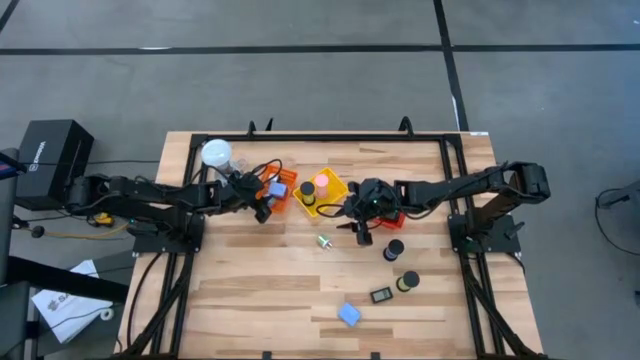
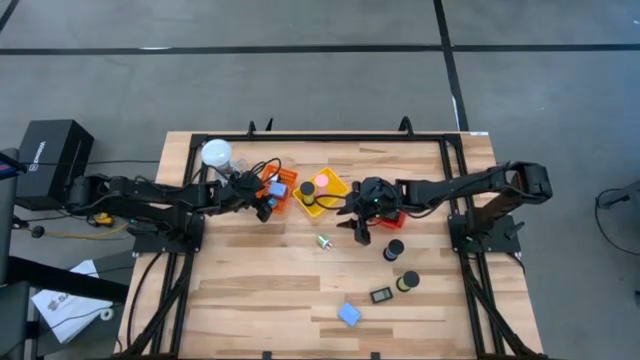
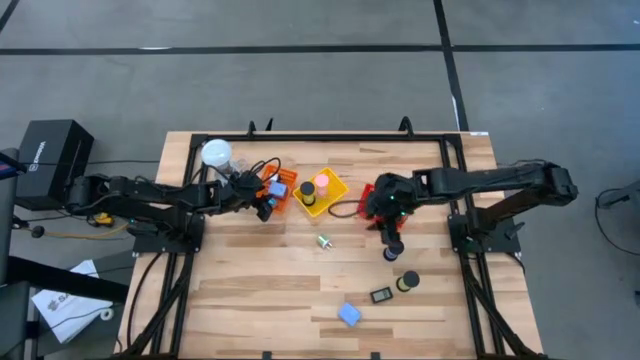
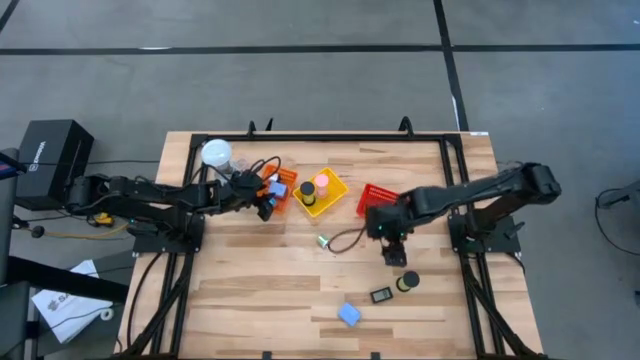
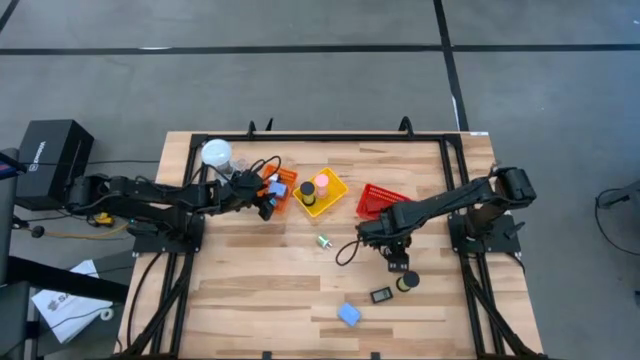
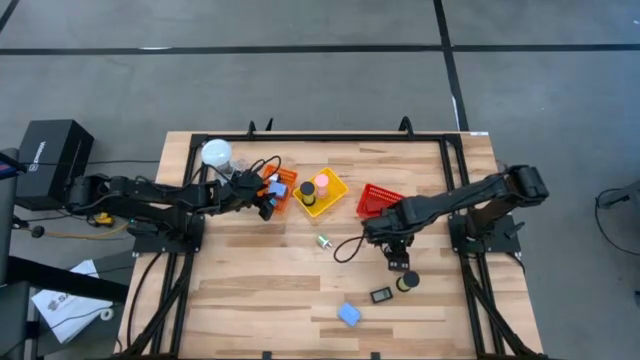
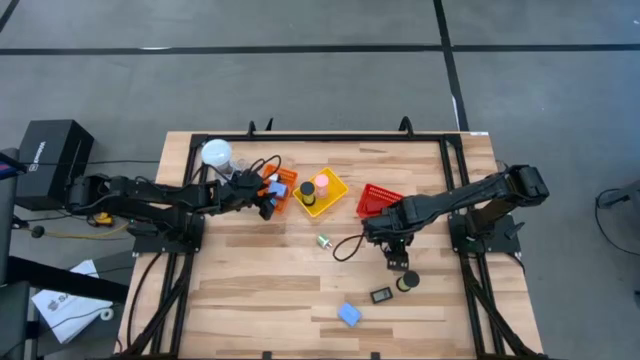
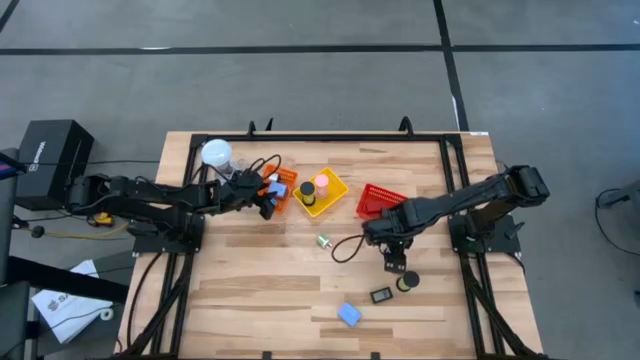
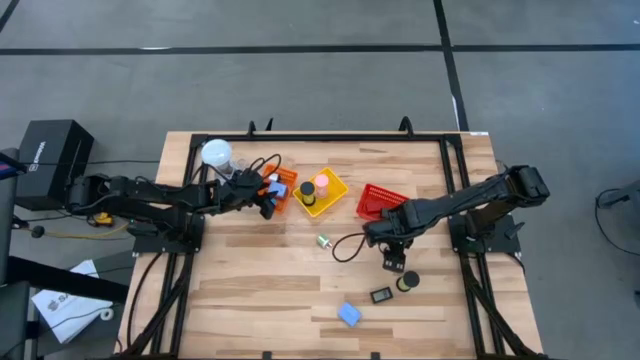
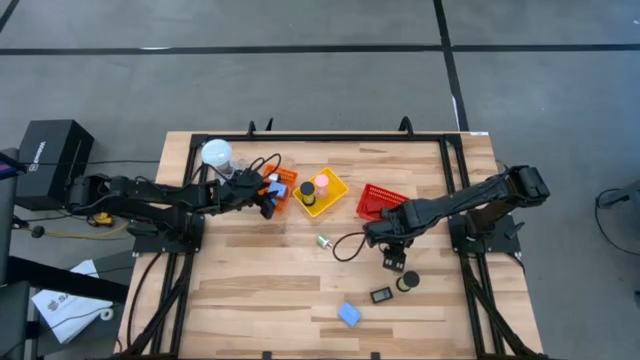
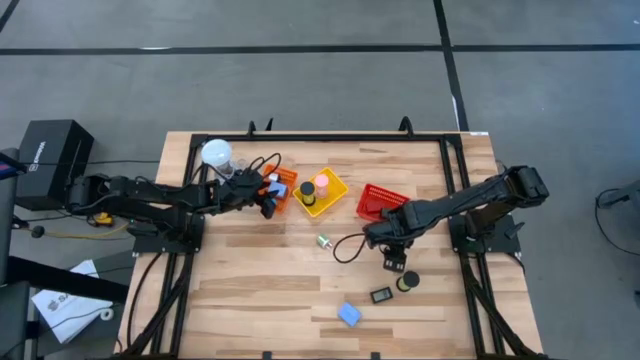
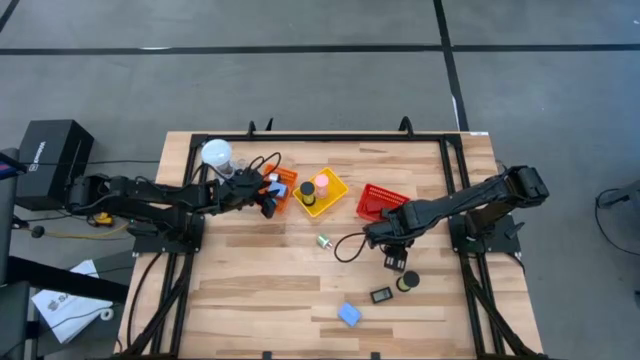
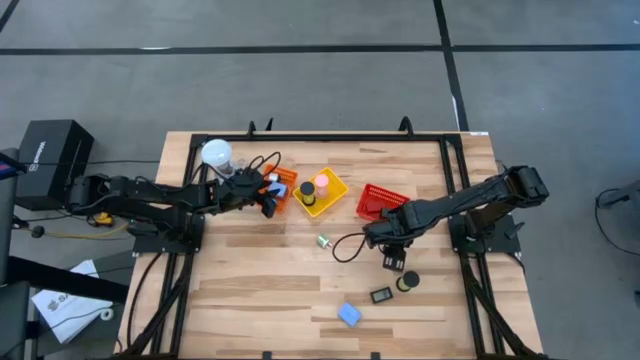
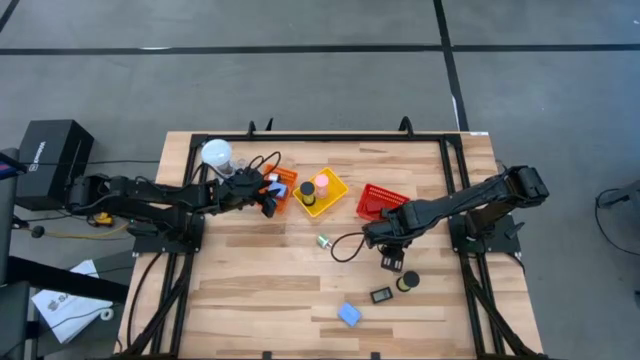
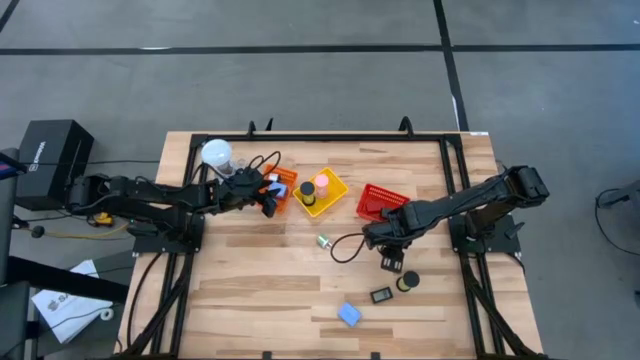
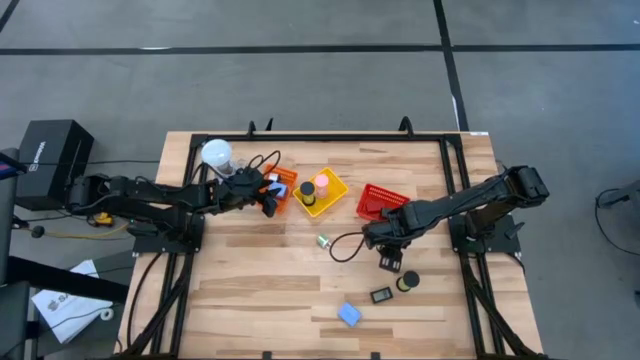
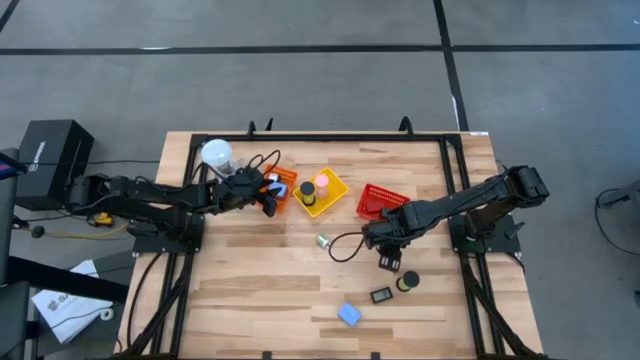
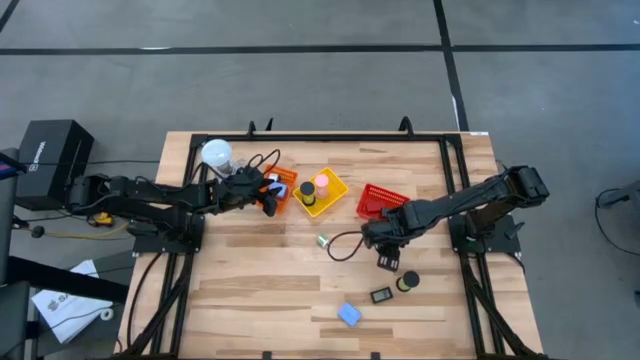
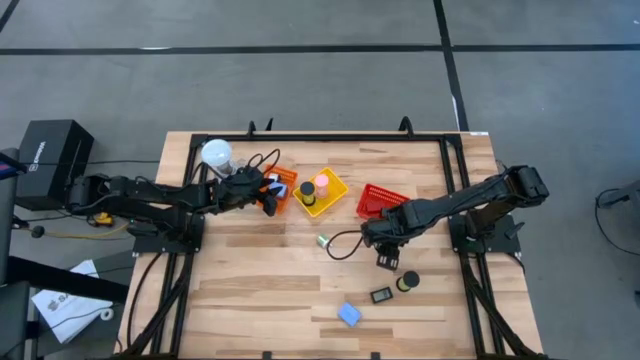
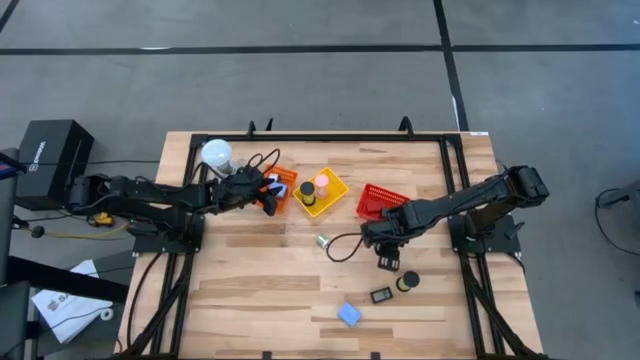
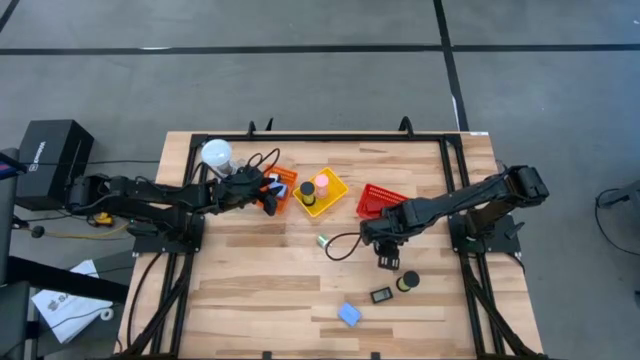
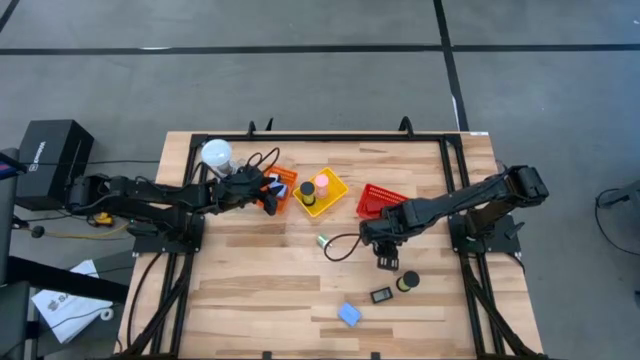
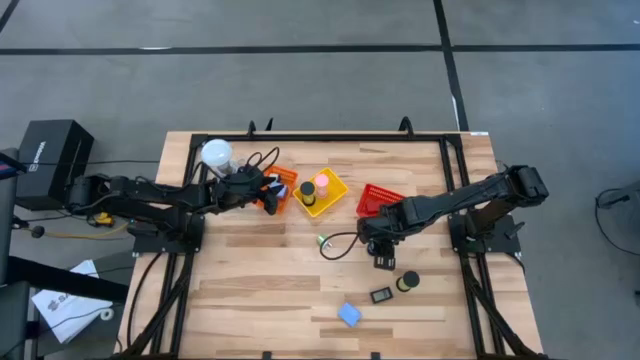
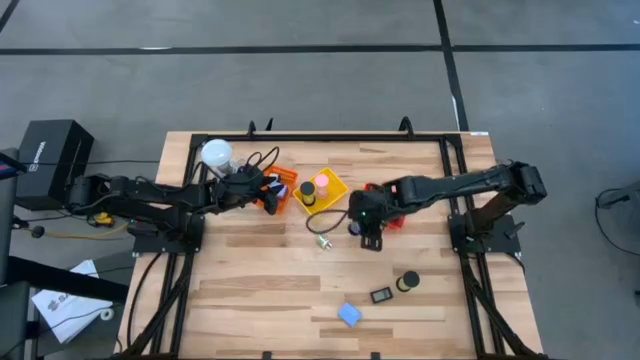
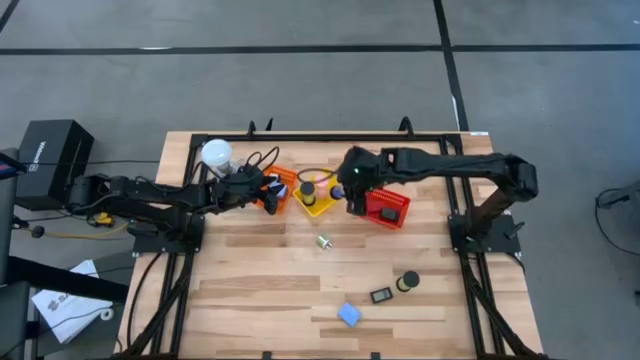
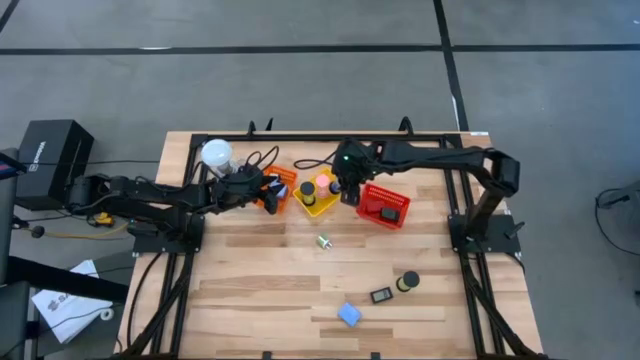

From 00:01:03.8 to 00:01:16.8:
Task: Pick & Place Office items
Put the blue hourglass in the yellow bin

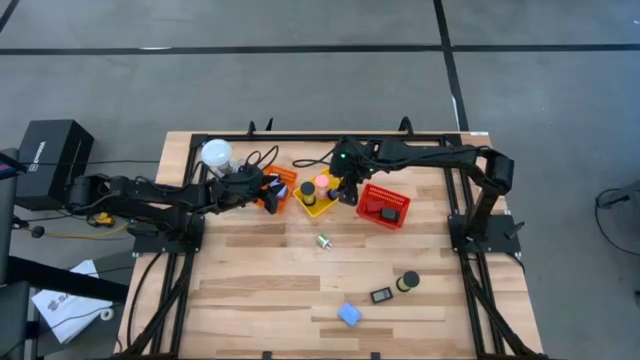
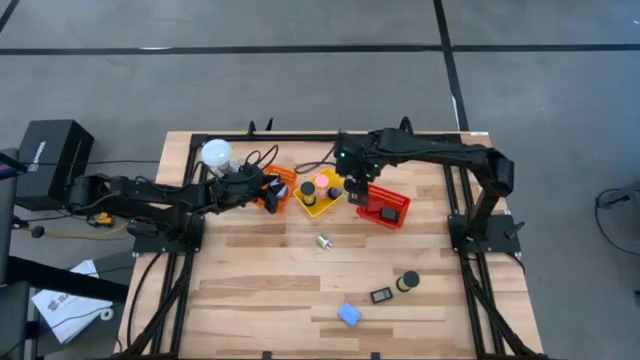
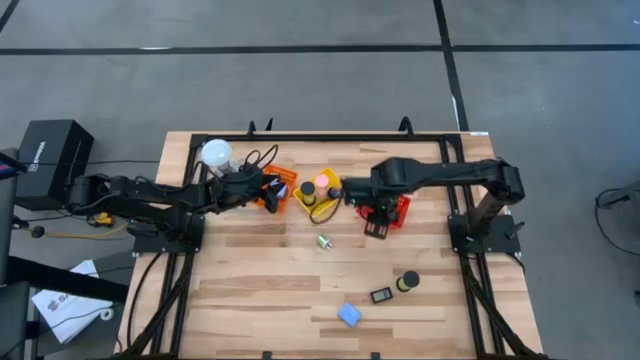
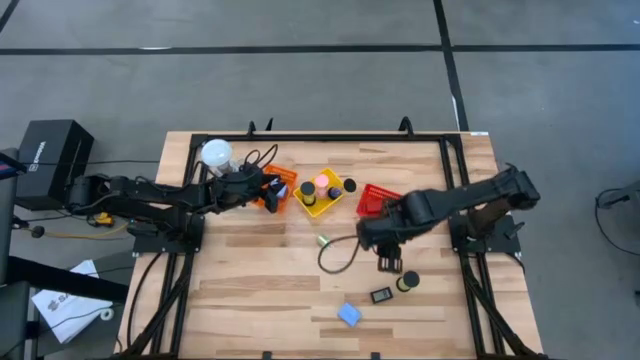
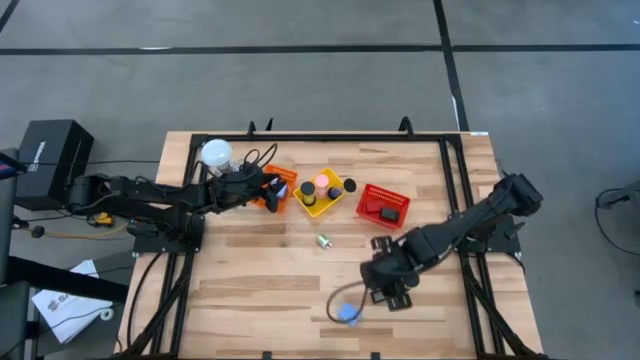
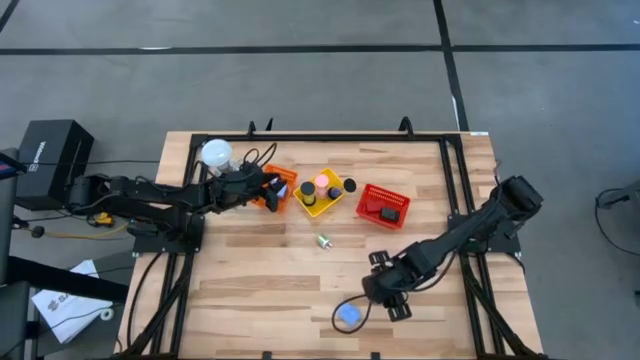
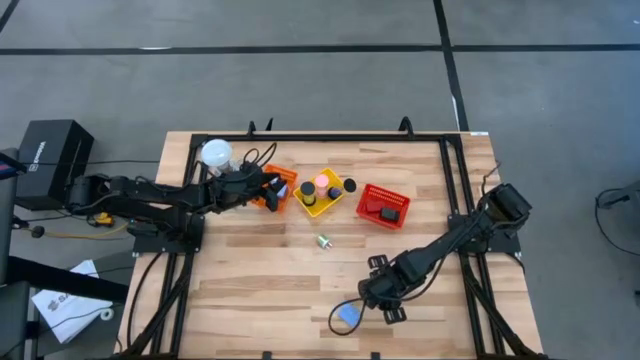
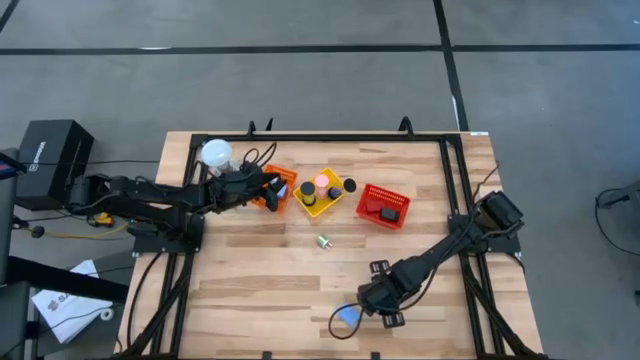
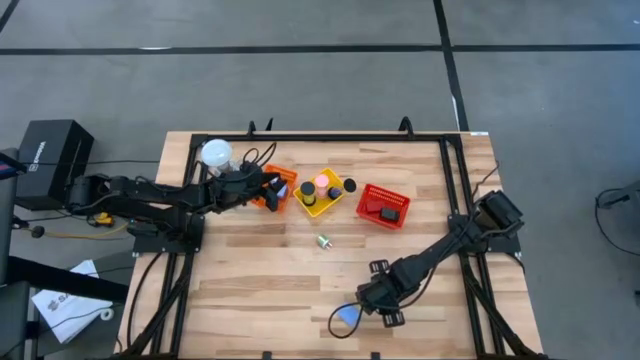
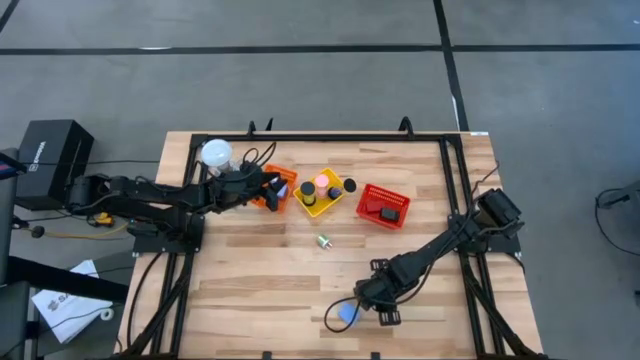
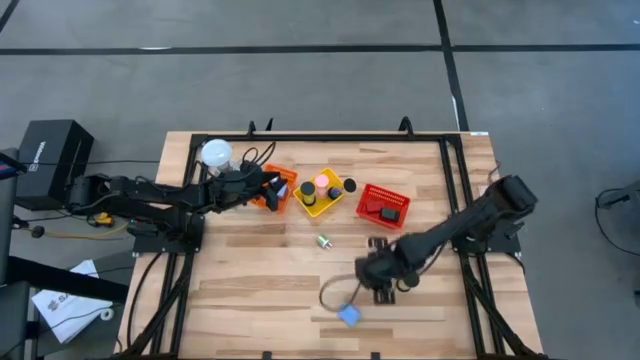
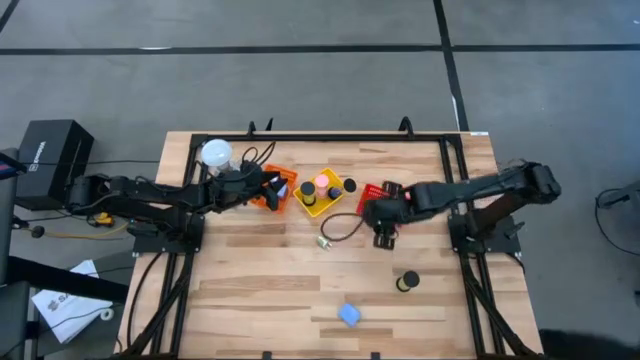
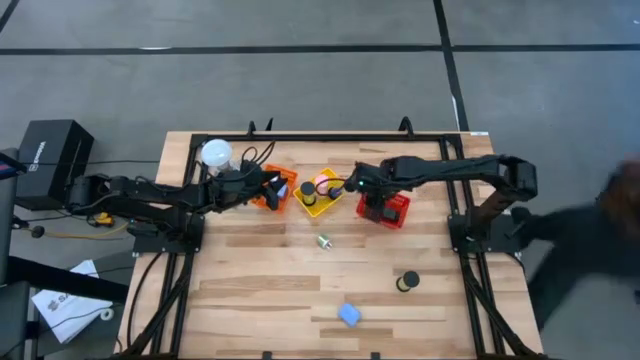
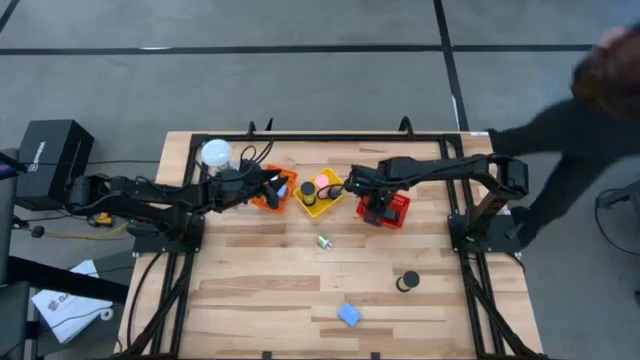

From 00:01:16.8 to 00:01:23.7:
Put the black timer in the red bin

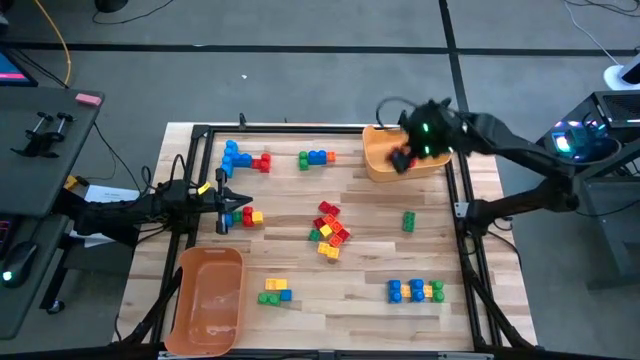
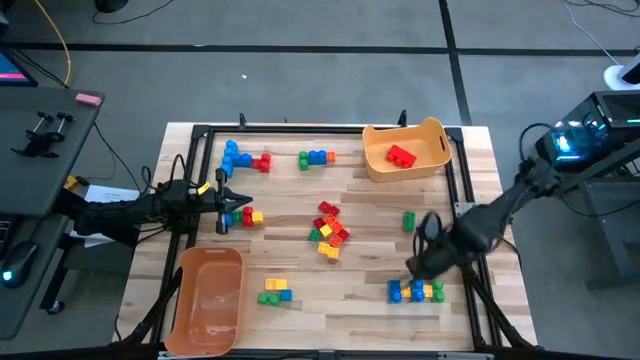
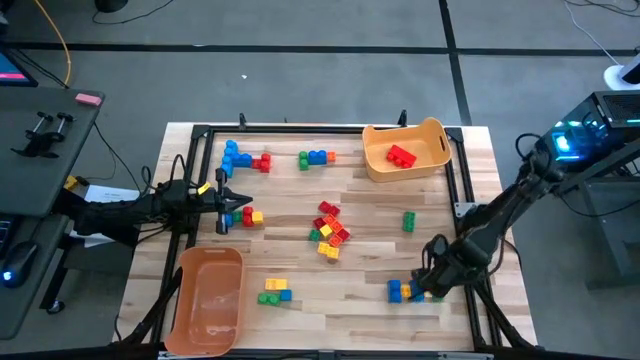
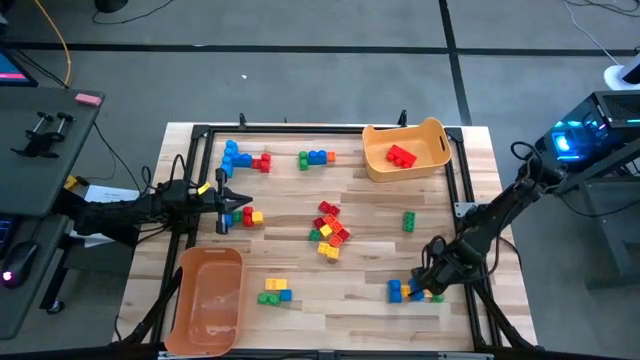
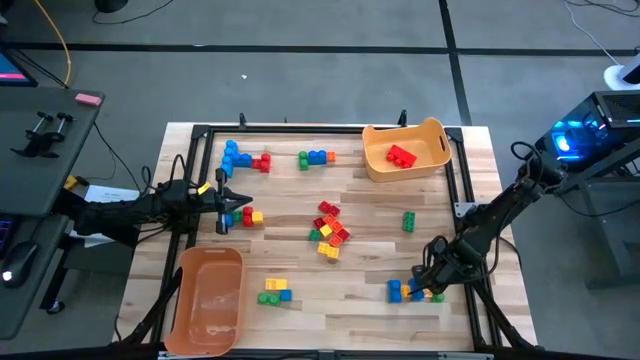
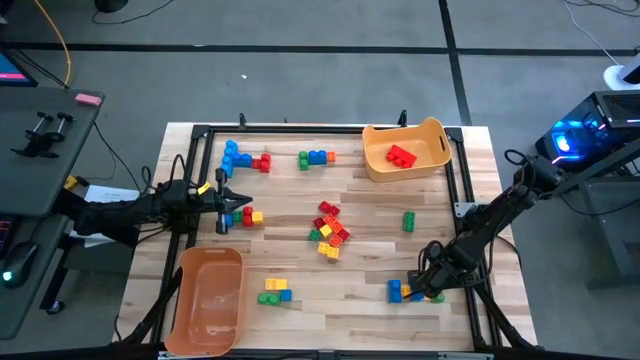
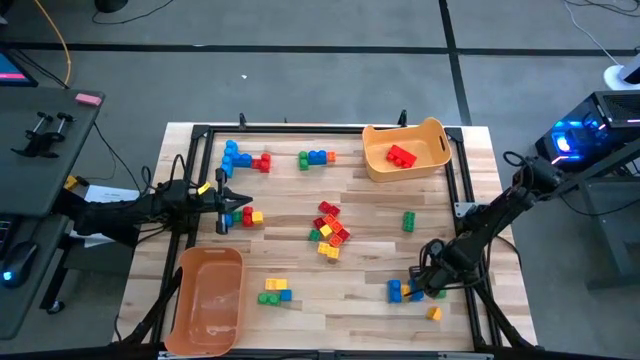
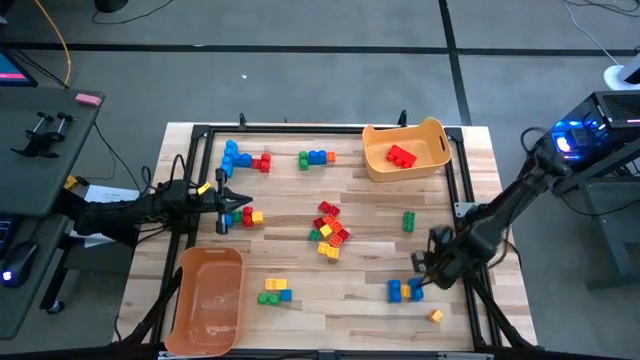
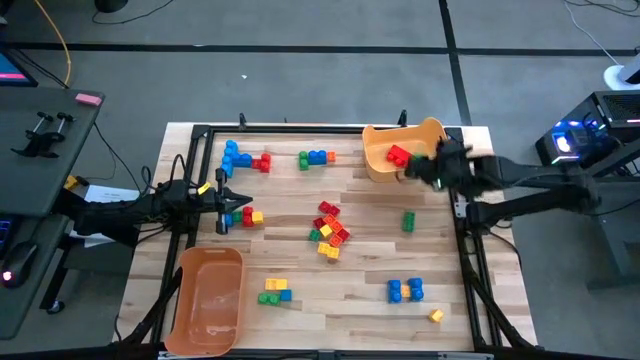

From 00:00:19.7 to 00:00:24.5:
Task: Sort blocks by size
Put the green game piece into the yellow bin
